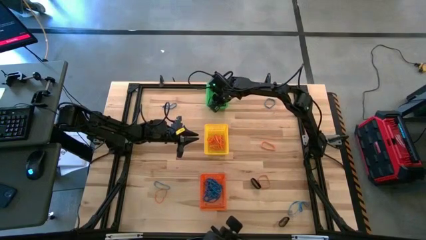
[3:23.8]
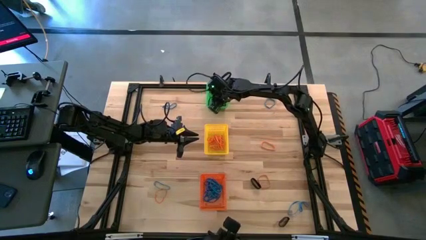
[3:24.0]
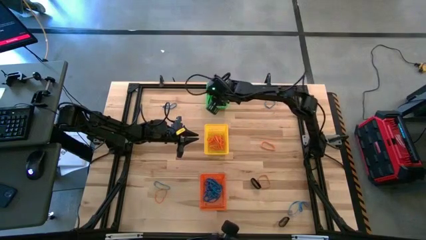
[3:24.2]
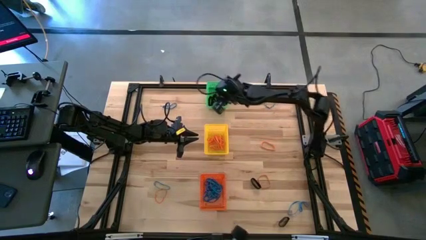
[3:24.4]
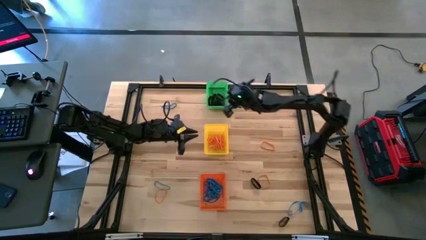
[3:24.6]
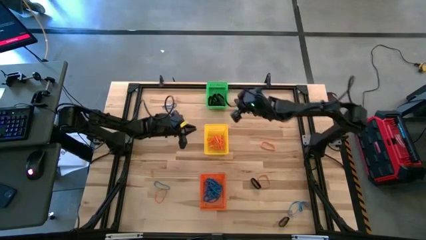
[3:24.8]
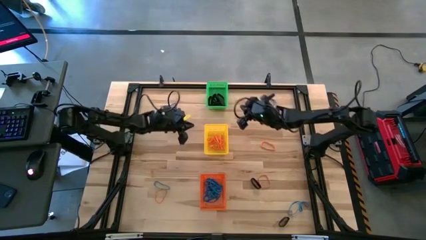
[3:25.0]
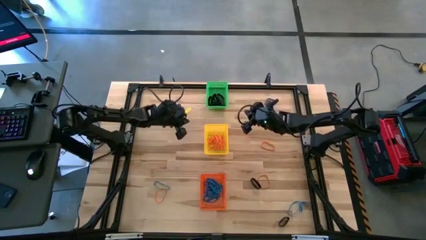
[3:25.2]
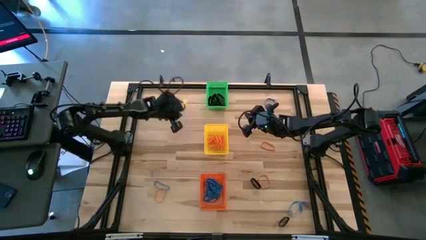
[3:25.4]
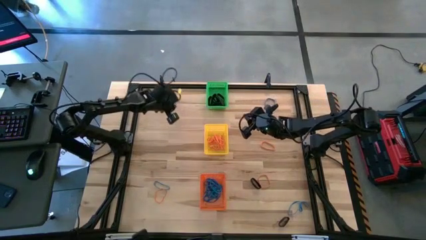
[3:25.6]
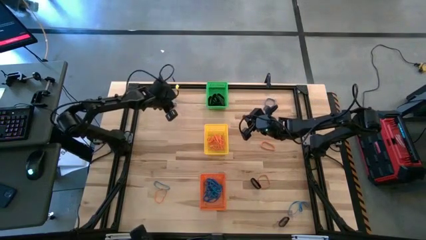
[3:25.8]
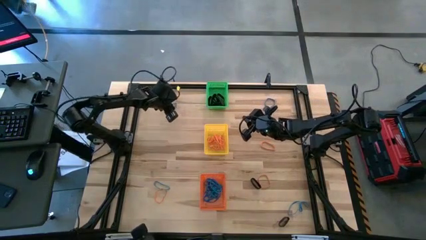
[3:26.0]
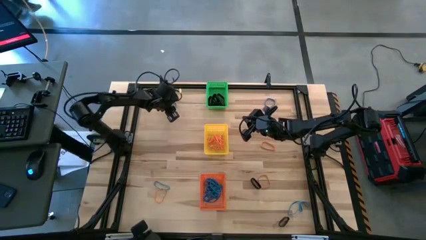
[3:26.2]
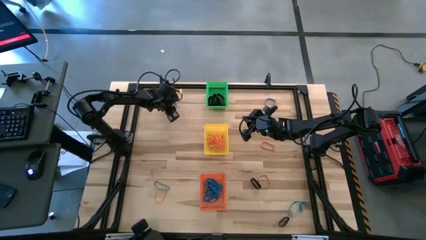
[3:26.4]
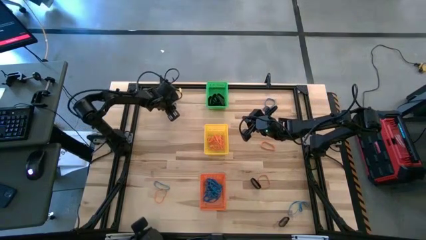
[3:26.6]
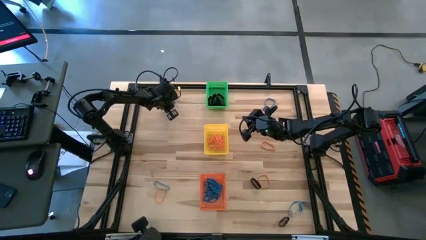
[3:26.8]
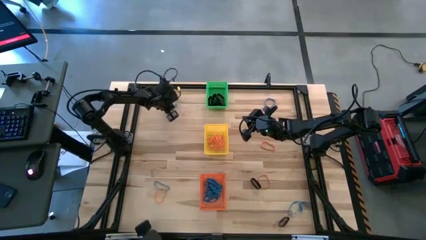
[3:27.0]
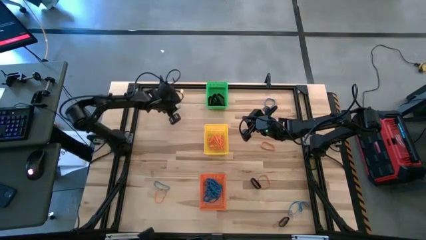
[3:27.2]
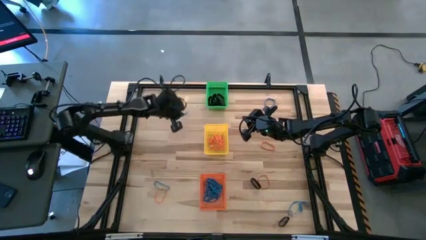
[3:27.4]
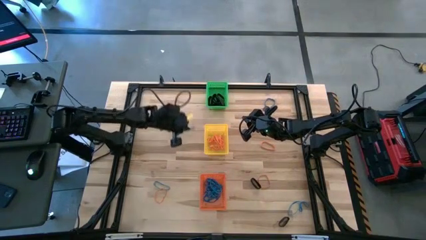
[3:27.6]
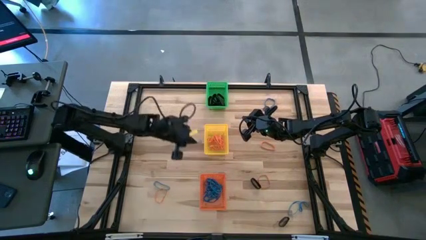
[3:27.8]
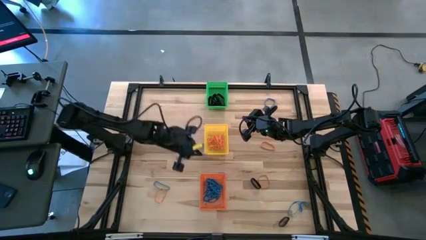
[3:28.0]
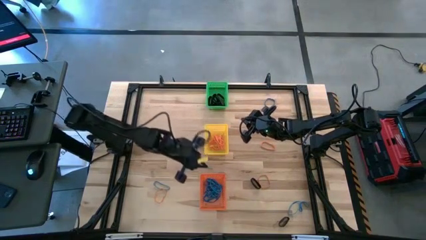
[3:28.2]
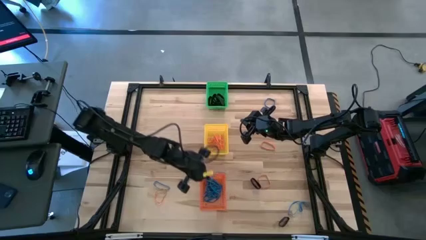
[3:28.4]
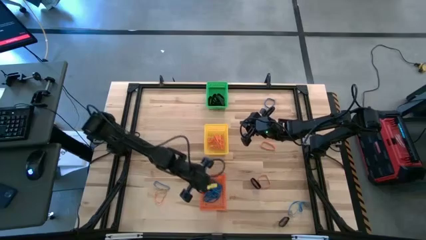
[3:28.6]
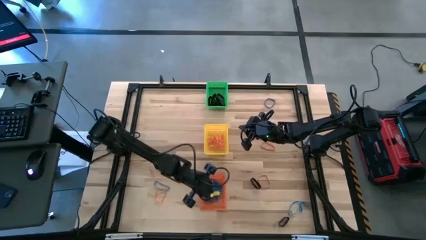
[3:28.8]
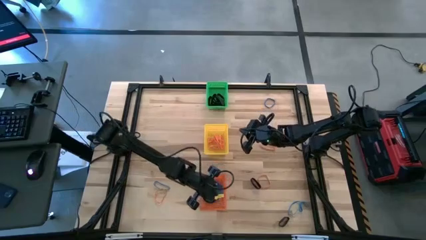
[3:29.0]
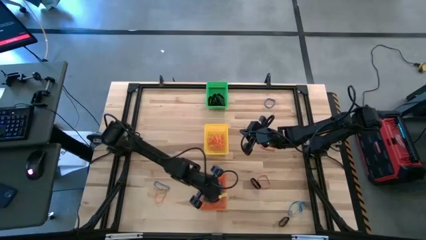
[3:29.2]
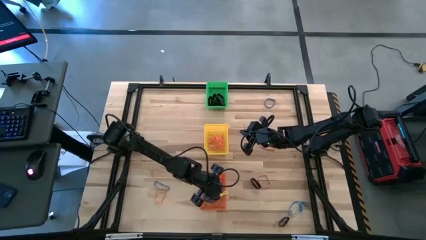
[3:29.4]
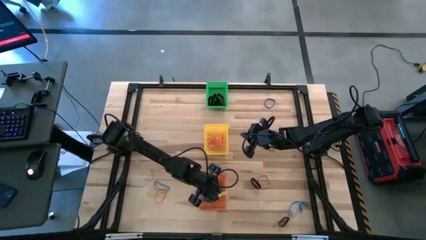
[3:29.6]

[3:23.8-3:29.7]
Task: Sort rubber bands into baskets
Put the blue rubber band into the orange bin

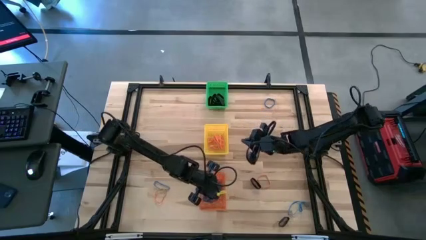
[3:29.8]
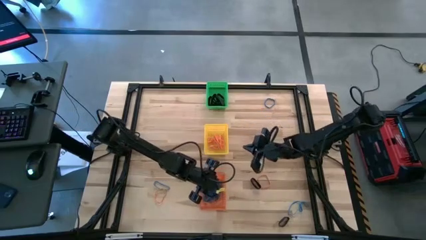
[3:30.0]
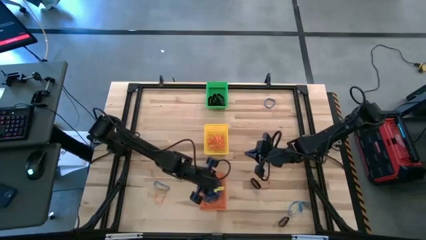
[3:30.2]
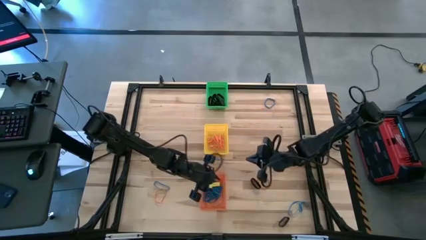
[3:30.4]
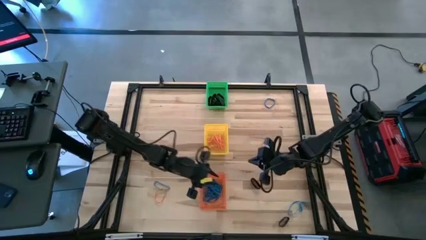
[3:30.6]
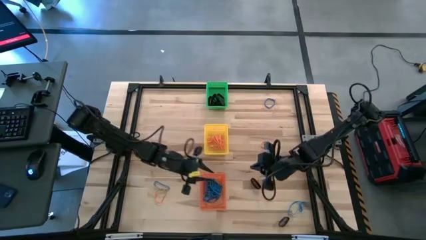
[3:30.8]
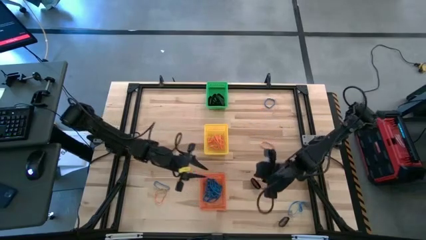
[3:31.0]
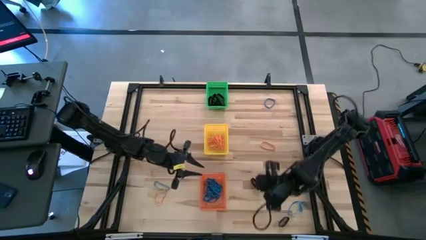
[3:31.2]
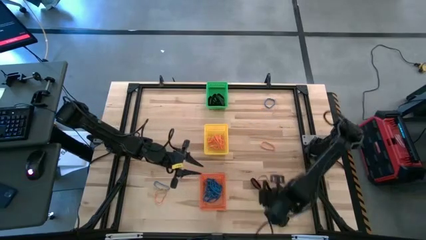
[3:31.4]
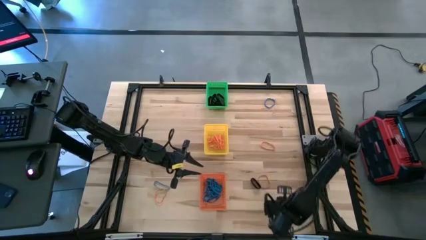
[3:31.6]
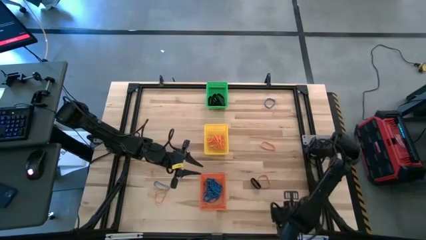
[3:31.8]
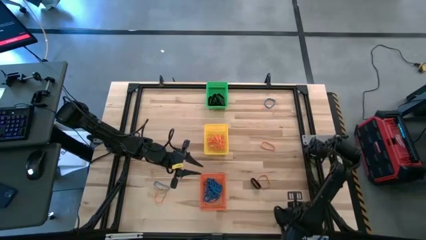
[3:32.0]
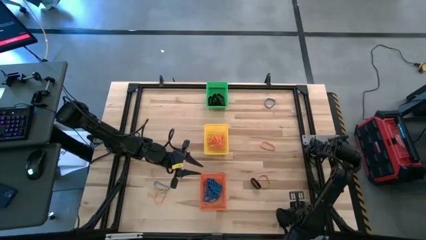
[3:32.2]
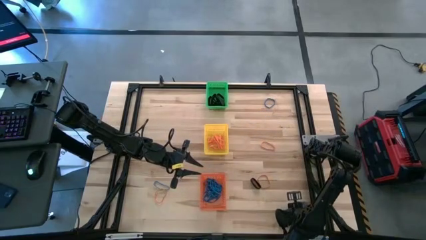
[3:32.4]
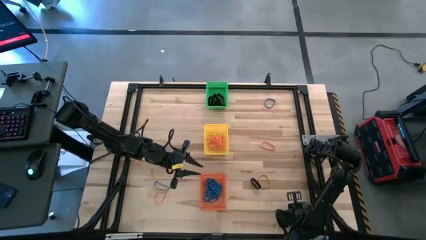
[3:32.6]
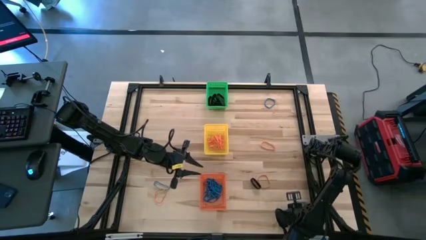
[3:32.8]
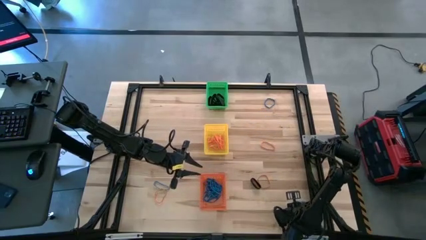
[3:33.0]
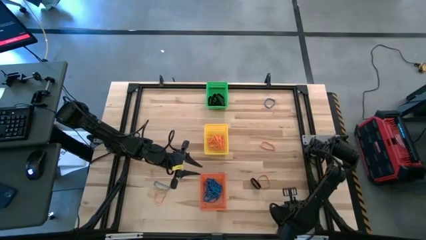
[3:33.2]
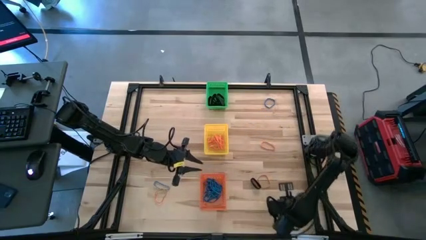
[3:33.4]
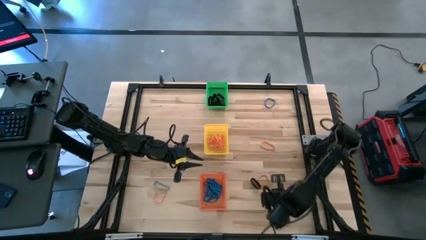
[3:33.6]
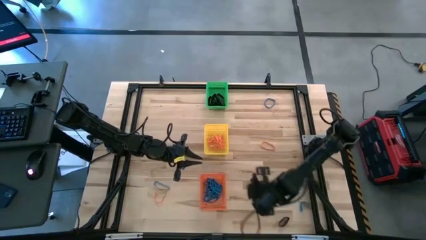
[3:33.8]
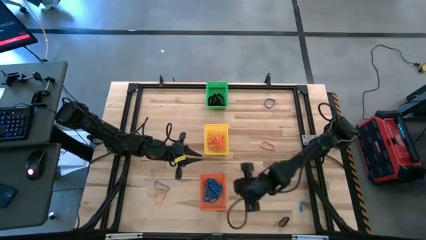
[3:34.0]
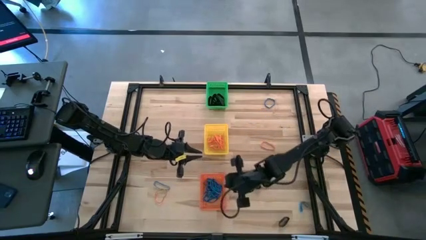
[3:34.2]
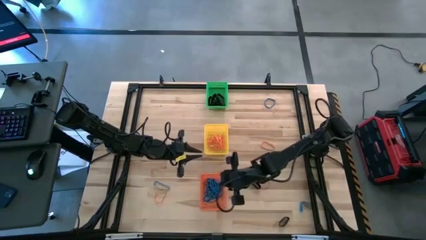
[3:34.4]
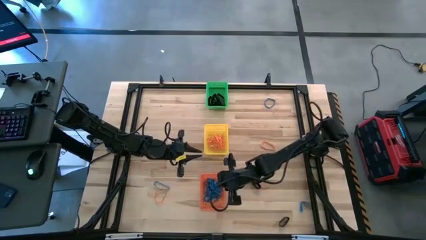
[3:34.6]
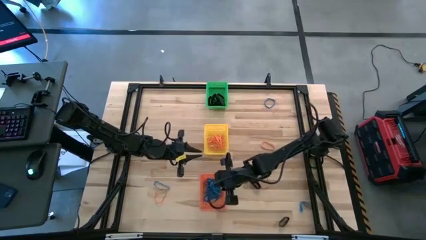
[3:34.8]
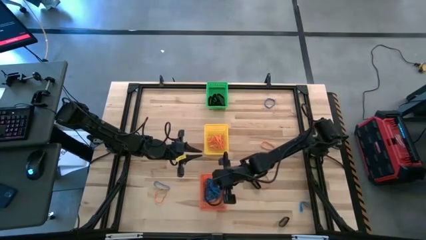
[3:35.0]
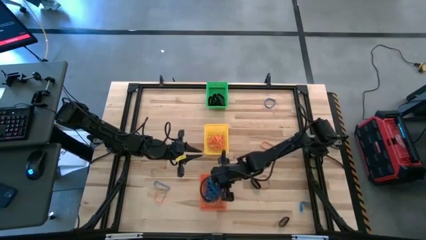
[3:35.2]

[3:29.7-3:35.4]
Put the blue rubber band into the orange bin

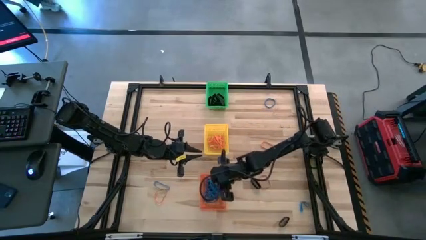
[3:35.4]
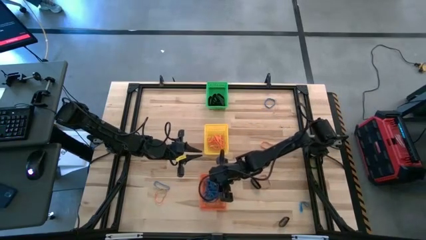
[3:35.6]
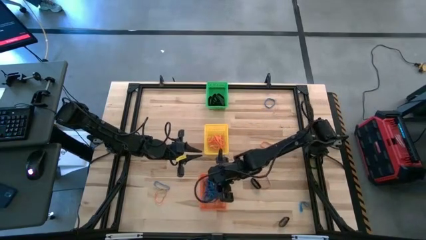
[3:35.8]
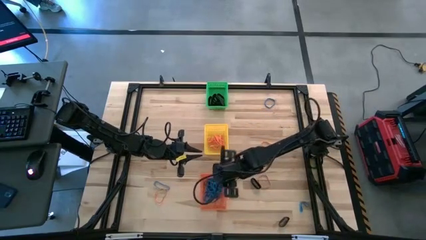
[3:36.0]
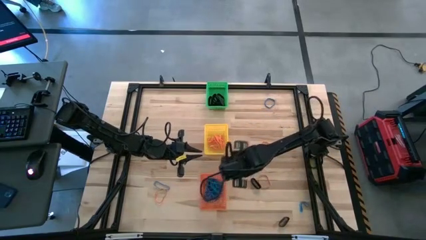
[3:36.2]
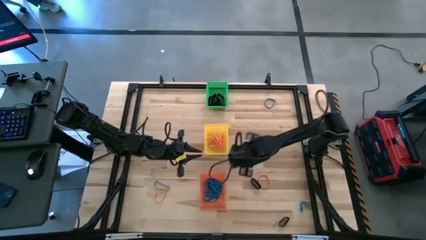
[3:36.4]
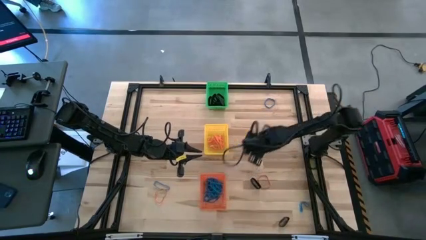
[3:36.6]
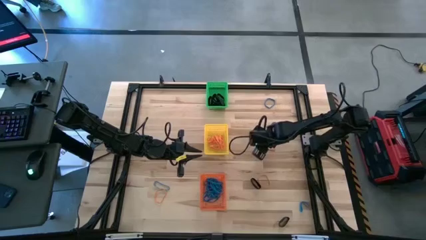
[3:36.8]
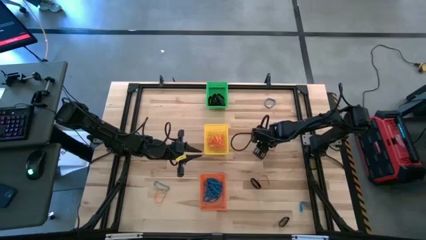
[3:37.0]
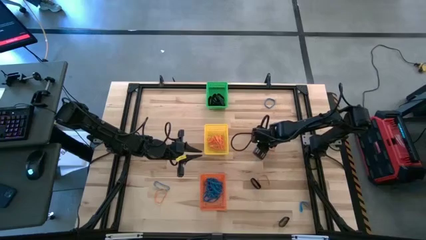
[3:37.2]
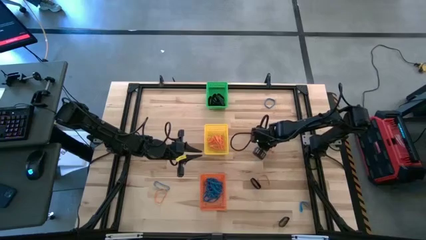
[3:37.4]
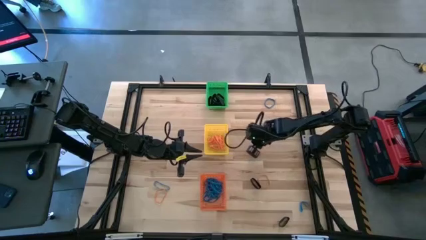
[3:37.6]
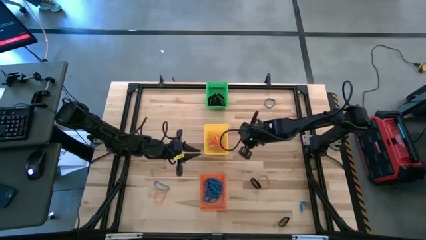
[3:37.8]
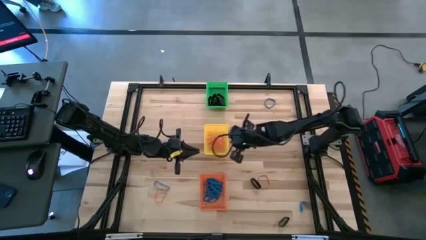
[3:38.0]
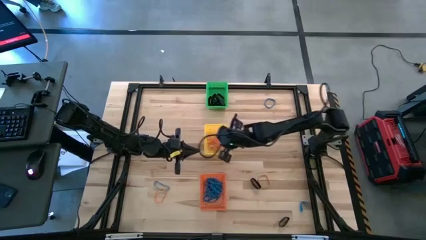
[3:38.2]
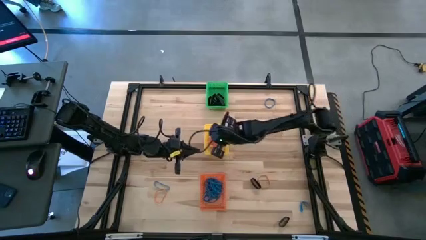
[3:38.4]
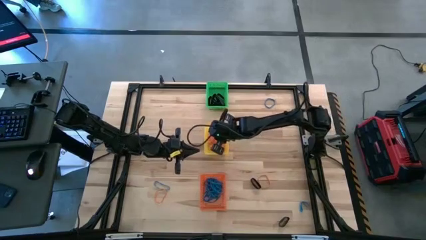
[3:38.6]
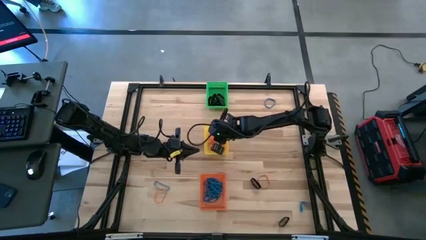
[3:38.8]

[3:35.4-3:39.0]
Put the orange rubber band into the yellow bin

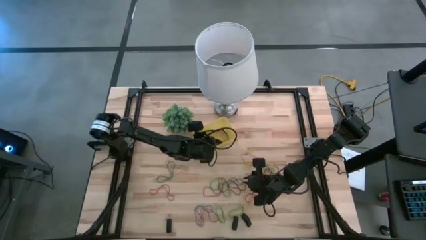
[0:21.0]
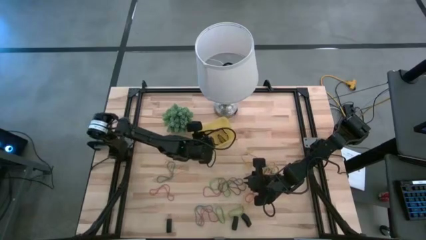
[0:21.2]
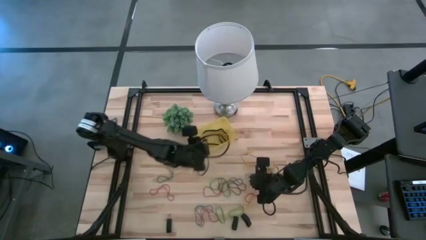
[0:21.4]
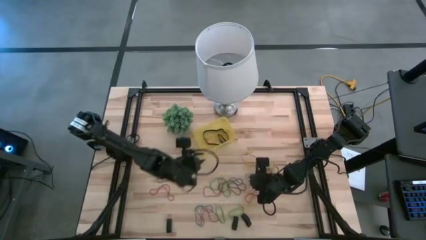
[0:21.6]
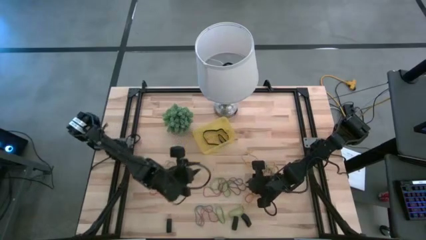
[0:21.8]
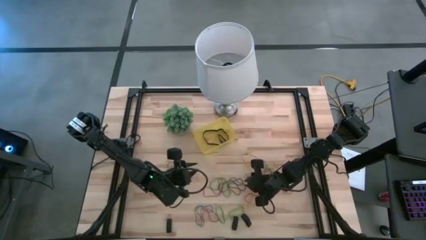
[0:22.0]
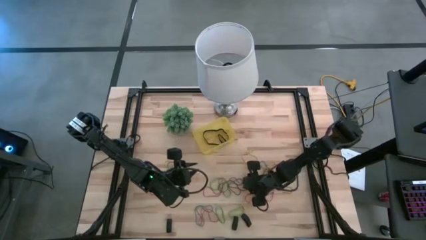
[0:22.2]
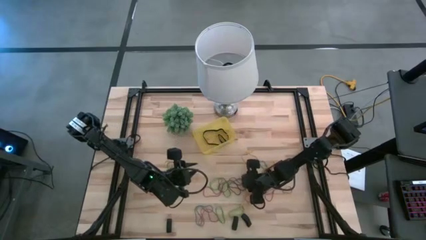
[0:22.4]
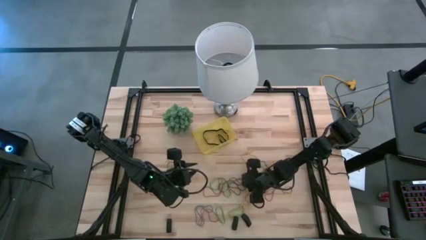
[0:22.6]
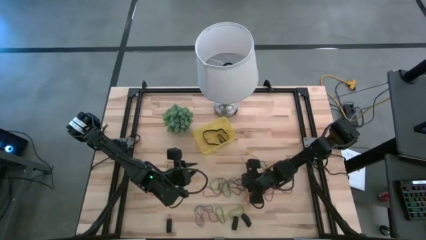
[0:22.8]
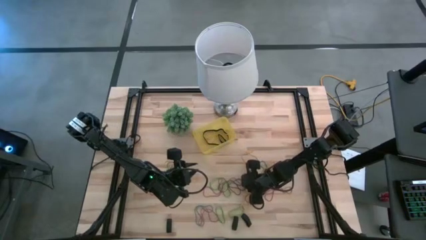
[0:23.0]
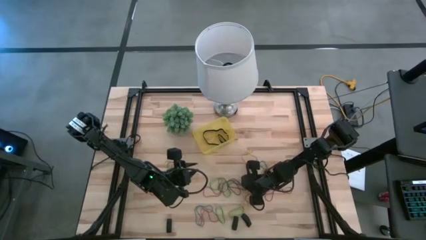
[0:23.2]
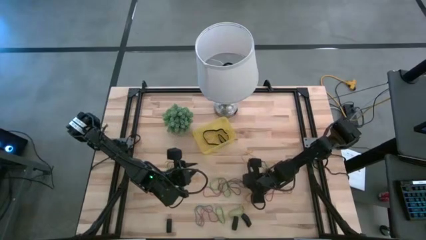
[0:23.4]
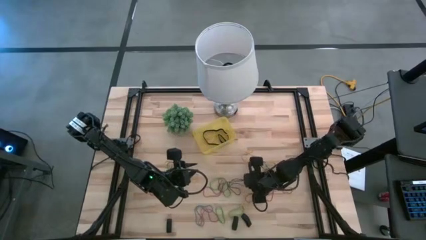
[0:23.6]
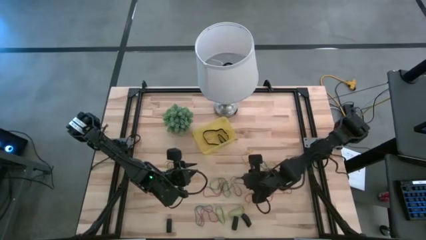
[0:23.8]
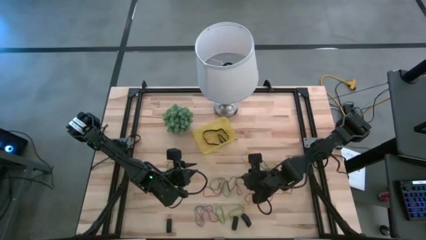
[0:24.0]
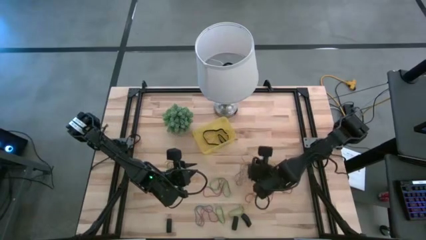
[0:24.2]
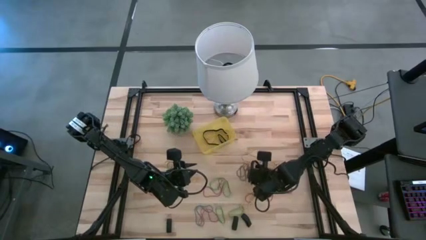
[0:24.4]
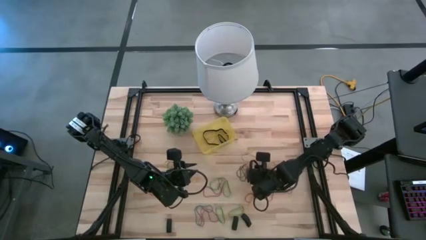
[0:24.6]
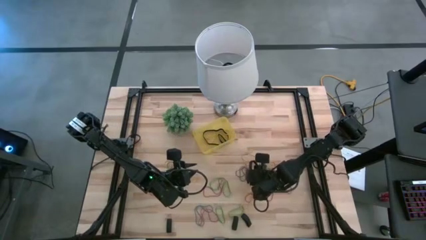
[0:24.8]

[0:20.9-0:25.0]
Task: Pick and place rubber bands into bin
Put the top purple rubber band into the yellow bin
